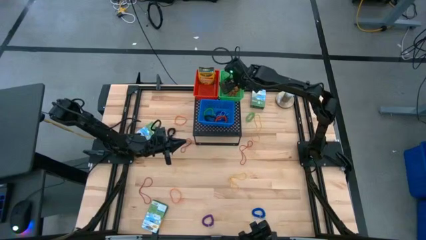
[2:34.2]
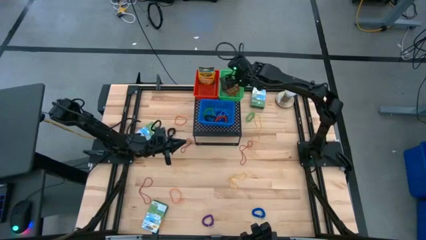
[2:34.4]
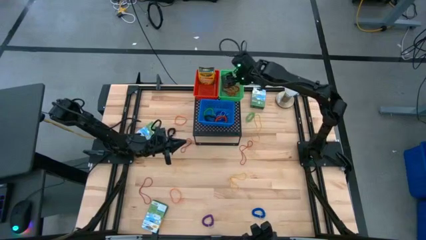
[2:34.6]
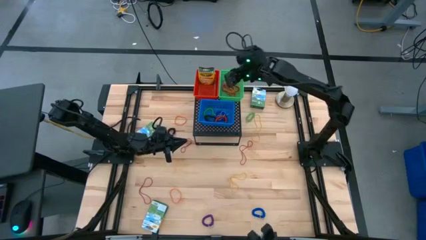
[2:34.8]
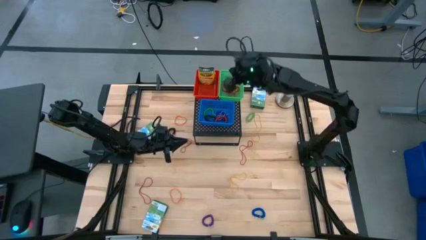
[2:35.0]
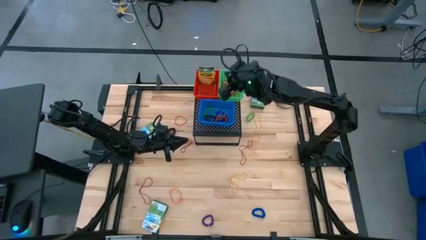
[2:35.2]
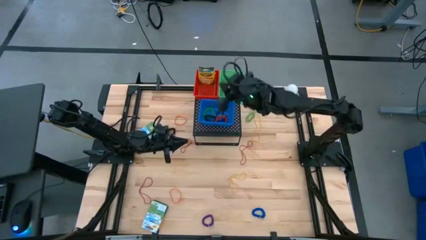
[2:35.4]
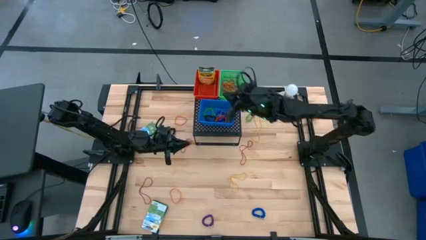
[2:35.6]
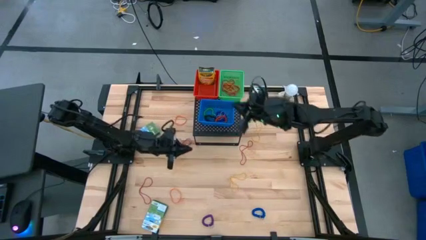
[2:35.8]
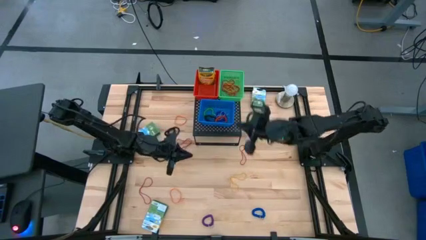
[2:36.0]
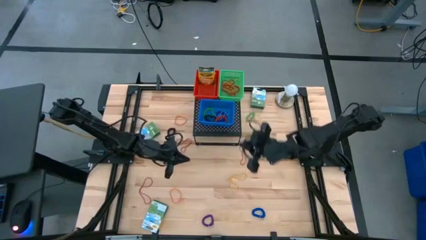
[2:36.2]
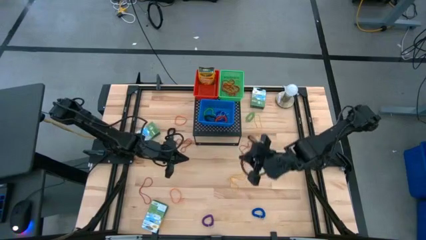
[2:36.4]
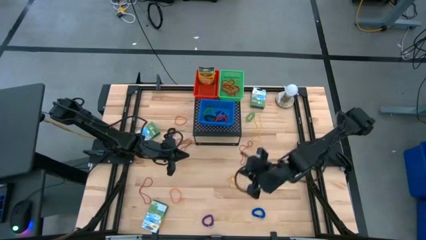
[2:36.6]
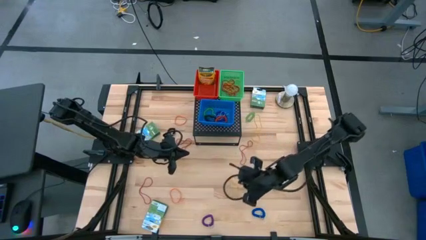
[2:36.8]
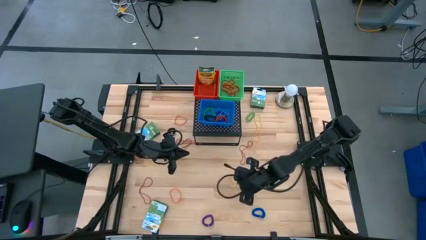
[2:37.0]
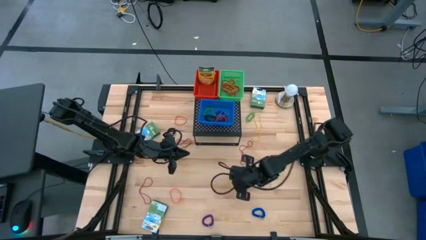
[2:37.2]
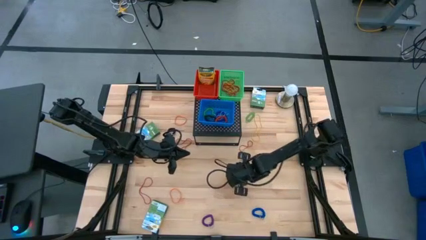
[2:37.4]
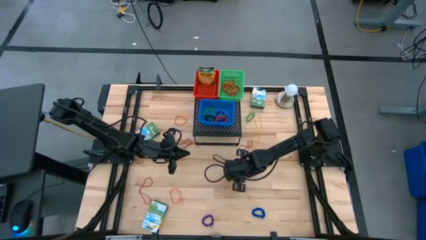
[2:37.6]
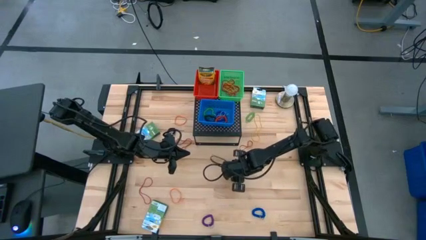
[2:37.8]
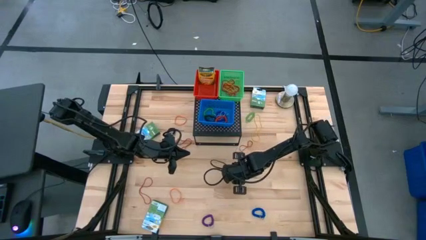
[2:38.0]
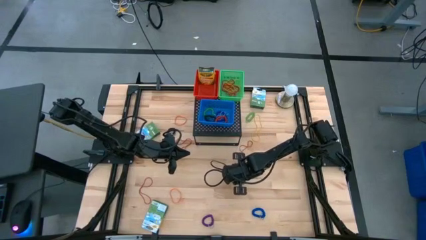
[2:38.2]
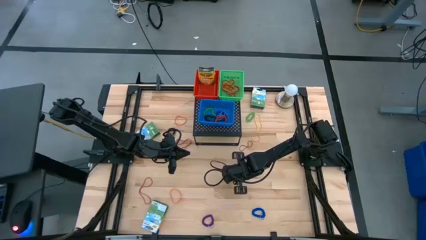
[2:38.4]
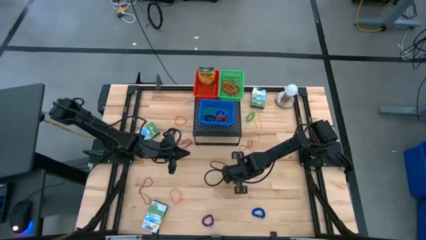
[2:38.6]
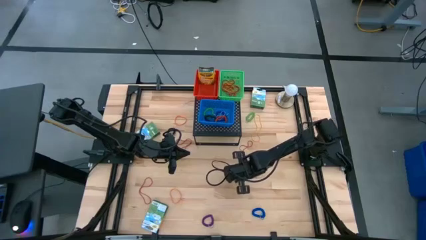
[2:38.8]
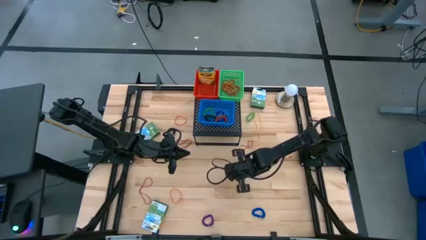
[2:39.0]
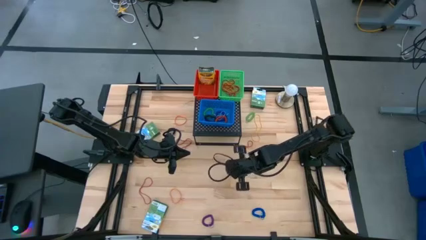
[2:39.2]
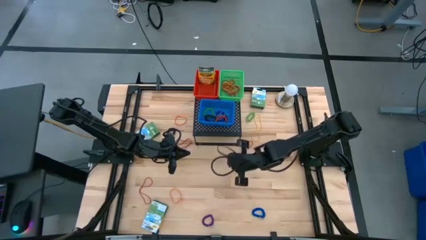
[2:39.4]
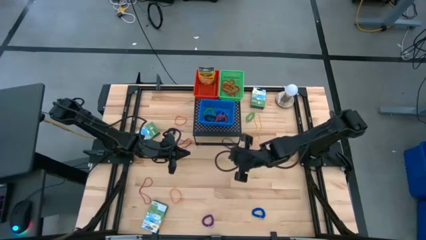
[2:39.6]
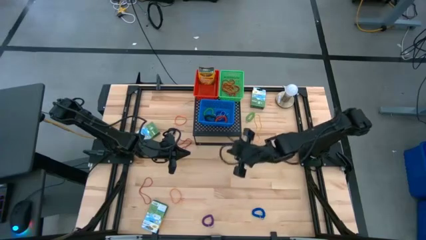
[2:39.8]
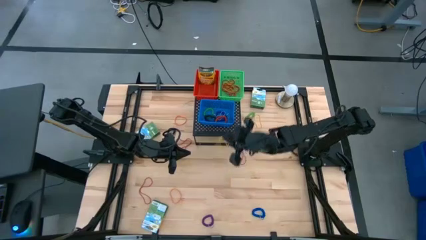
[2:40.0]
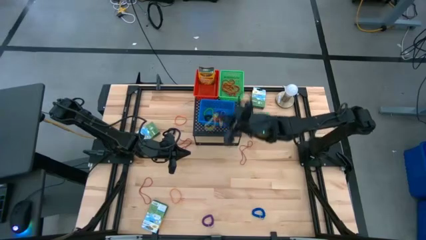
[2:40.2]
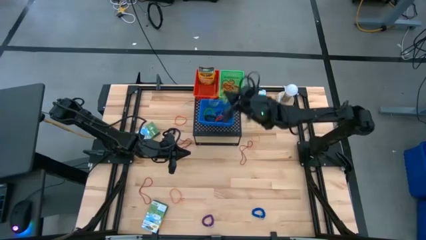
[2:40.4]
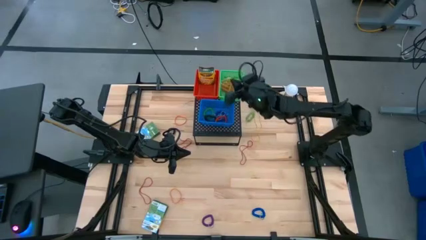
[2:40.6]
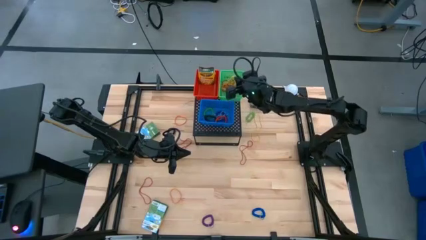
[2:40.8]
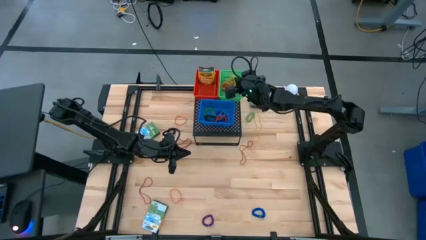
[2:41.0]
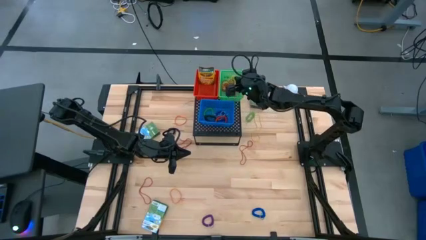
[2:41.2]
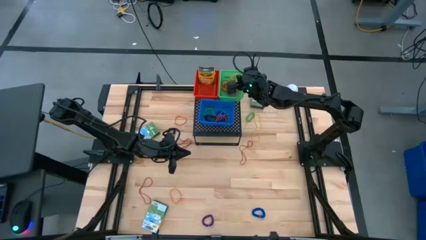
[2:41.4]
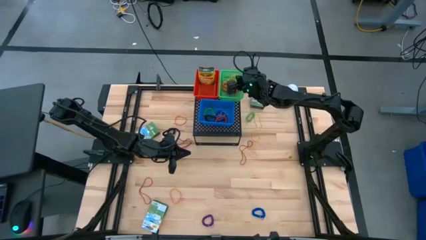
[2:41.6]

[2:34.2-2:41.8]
Task: Pick & Place Office Desk Supplies
Put the yellow rubber band into the green bin on the shelf

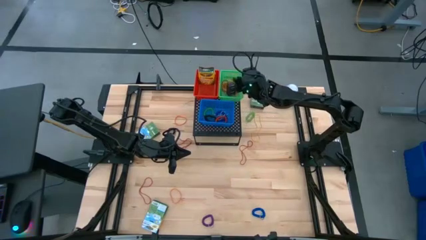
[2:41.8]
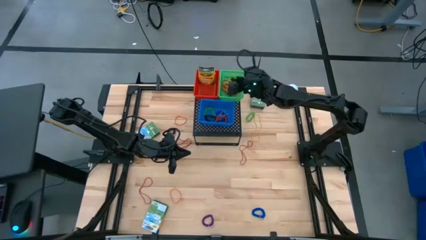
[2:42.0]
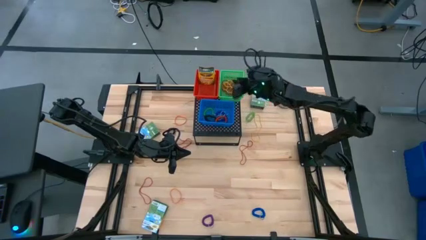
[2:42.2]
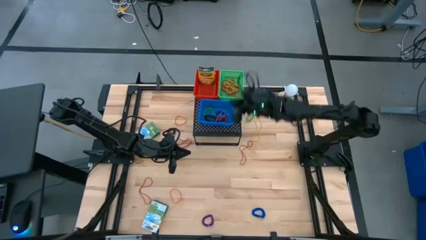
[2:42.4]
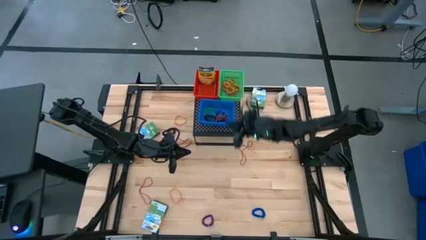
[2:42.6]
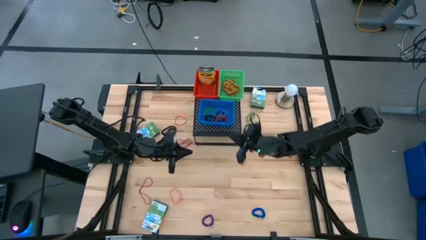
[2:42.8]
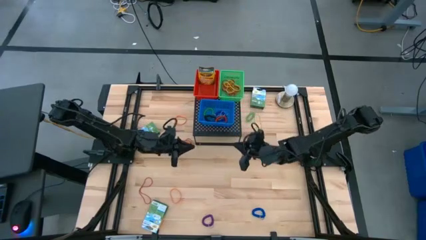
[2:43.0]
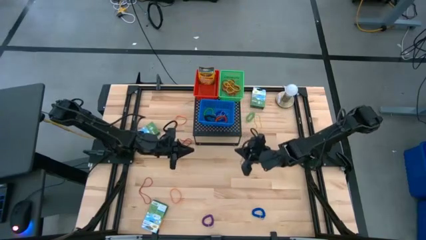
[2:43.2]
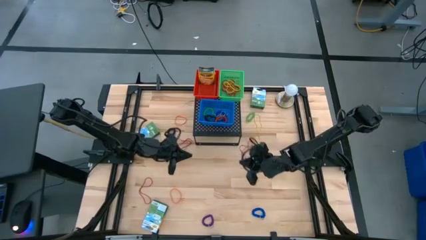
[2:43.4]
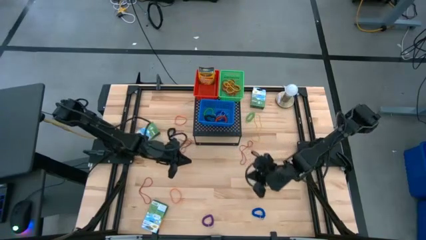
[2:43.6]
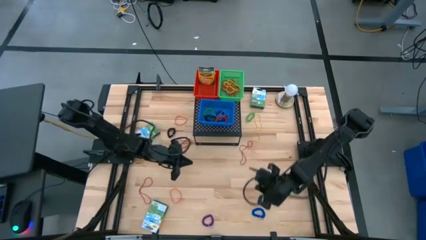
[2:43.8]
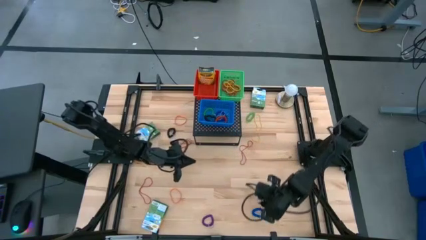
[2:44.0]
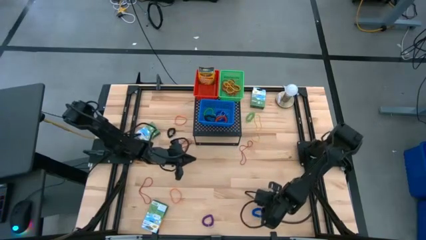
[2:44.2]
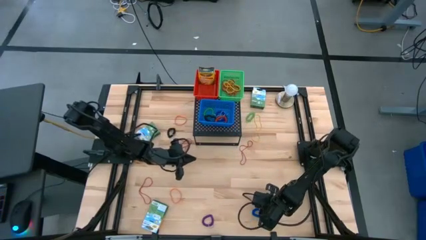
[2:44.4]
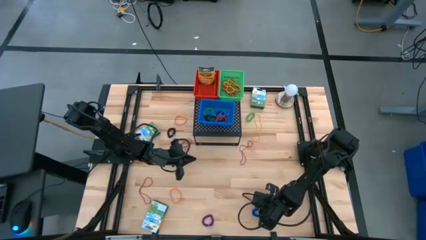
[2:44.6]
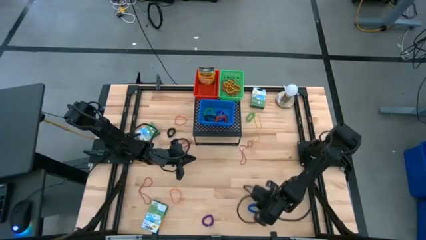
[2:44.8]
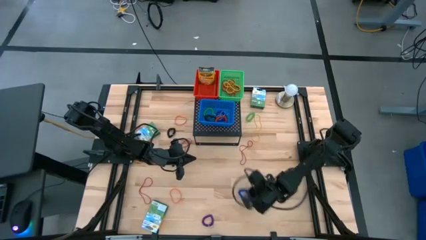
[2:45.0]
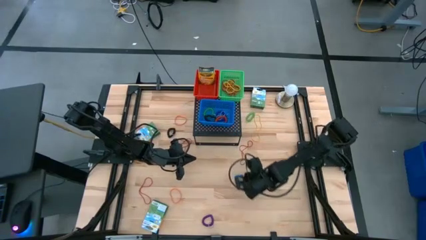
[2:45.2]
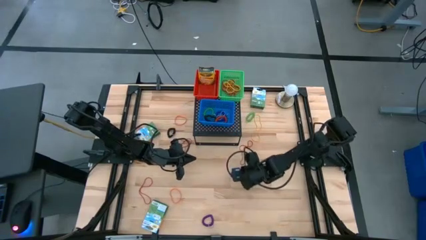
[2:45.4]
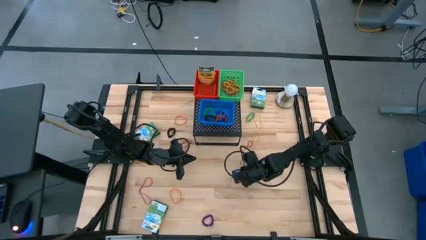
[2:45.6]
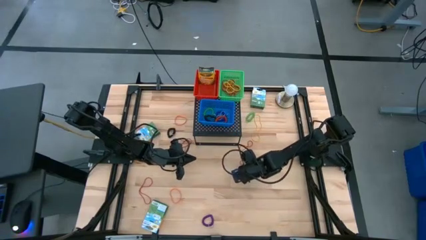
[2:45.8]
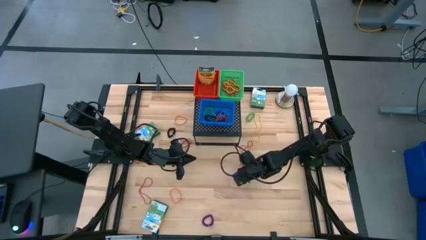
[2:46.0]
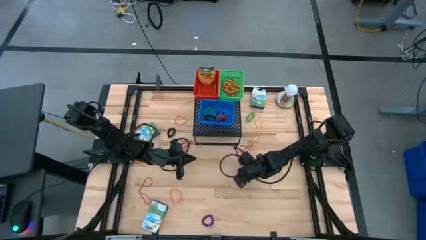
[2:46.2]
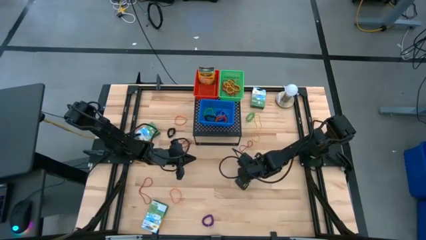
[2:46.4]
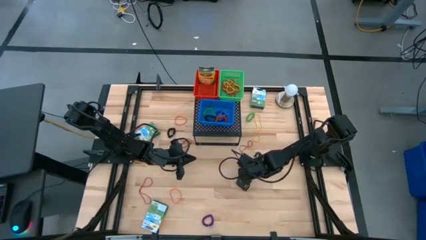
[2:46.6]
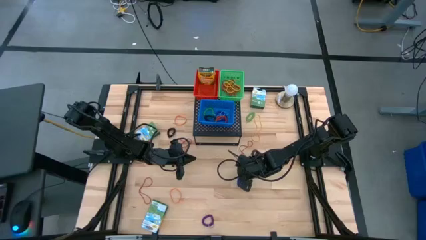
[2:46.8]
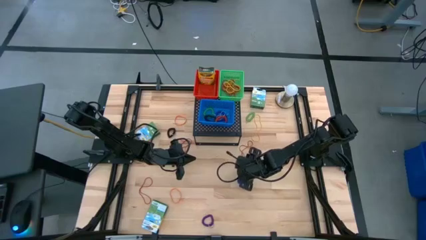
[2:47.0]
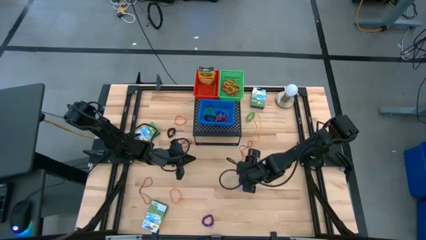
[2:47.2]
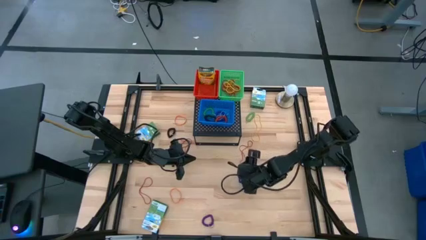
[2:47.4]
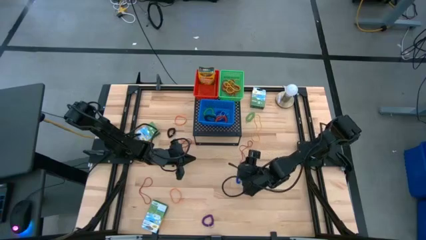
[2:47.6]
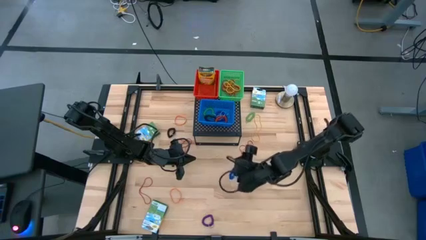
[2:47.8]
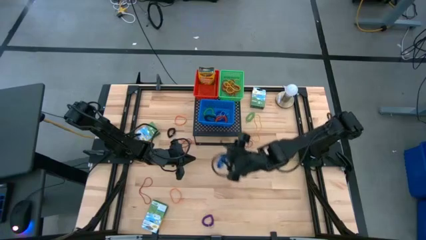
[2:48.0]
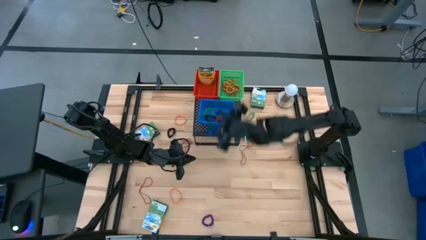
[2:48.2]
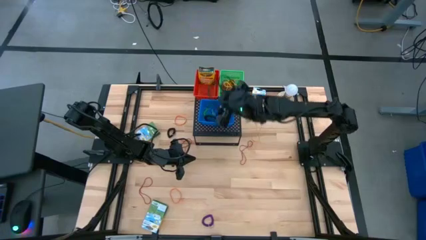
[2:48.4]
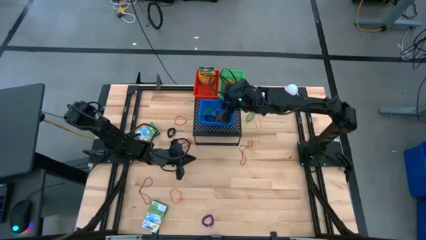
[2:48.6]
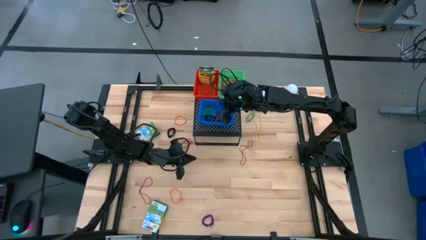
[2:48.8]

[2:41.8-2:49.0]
Put the blue spring keychain into the blue bin on the shelf

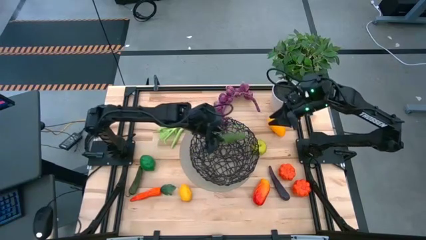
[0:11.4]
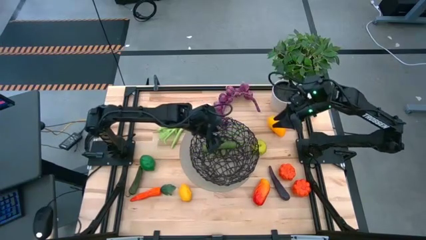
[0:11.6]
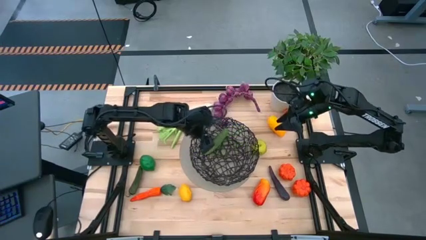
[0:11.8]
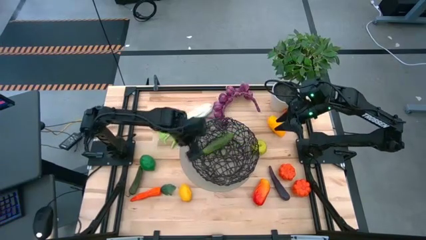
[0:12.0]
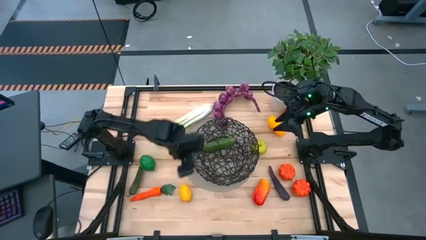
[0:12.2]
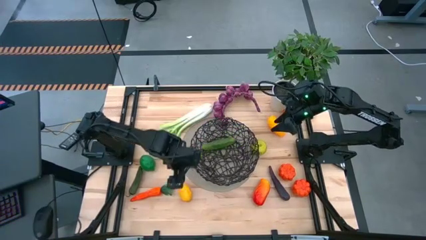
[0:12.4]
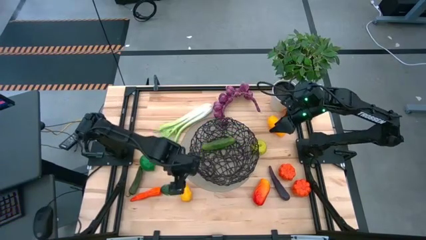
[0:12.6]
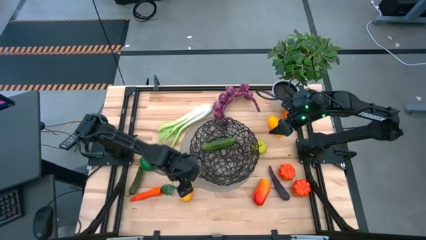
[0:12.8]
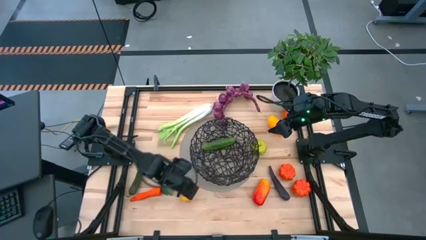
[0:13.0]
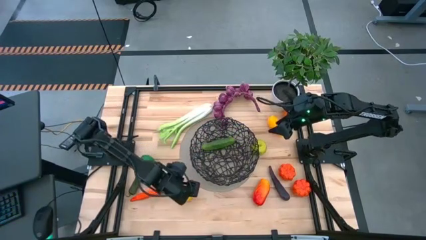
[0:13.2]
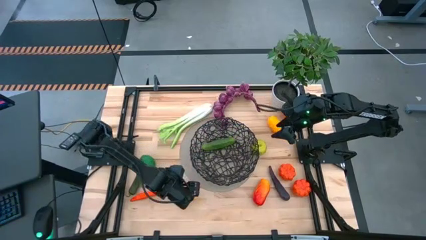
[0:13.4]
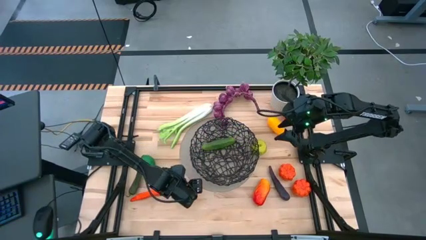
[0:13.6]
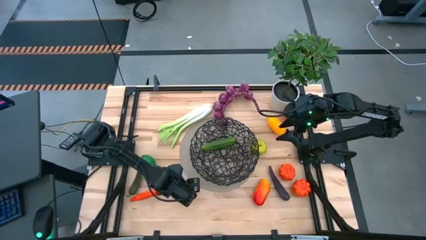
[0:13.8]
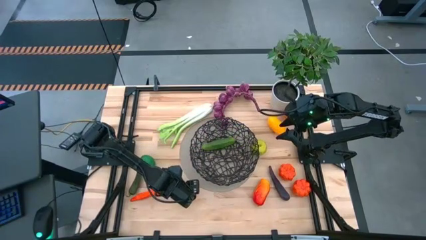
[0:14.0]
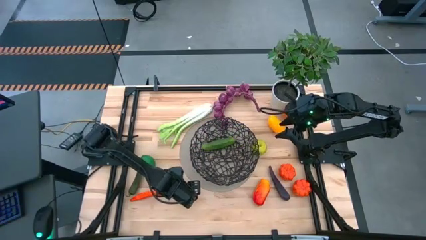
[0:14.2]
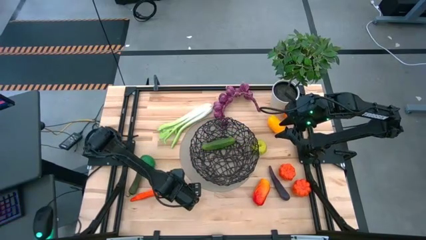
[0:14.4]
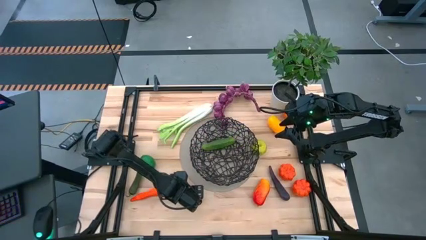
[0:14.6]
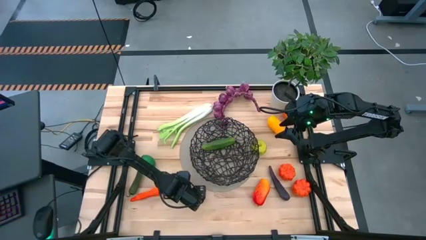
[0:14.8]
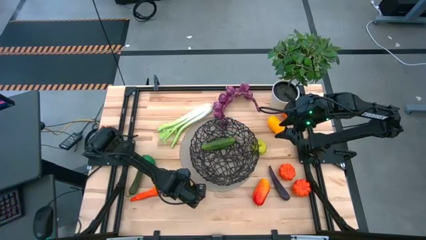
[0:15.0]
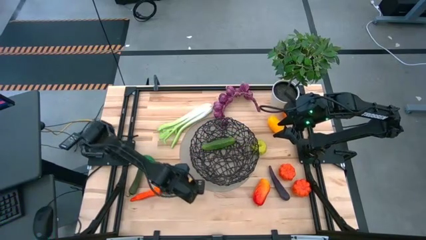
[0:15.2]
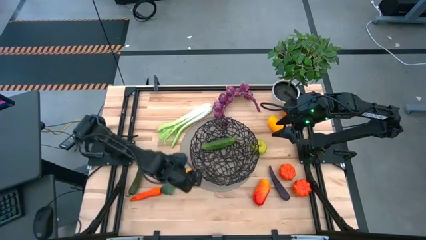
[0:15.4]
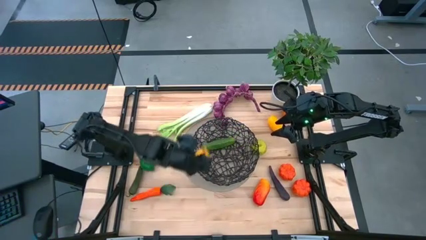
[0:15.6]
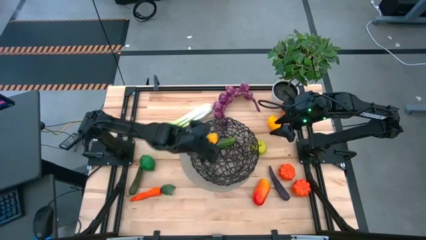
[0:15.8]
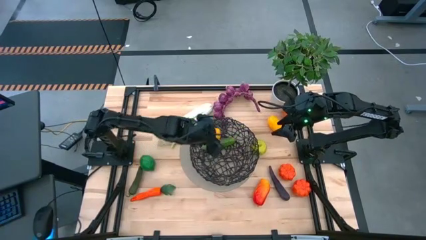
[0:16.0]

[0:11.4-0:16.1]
Task: Build produce basket
Put the yellow lemon into the black wire basket
